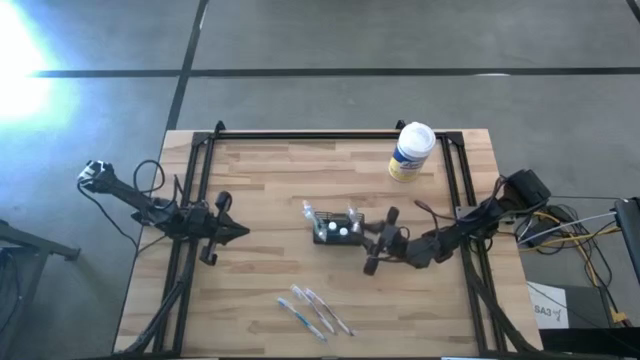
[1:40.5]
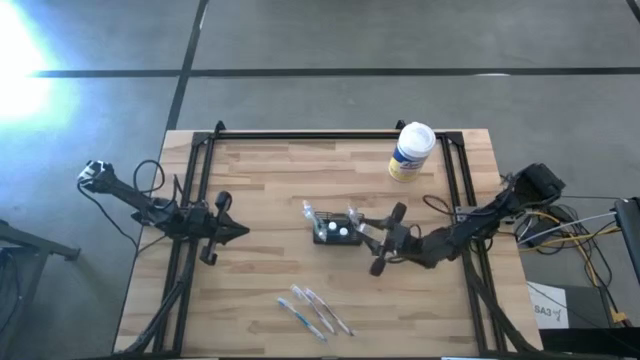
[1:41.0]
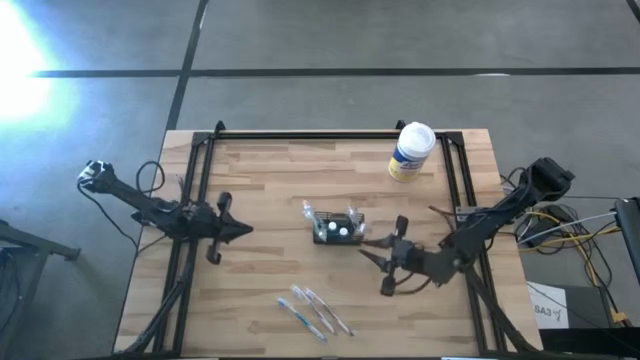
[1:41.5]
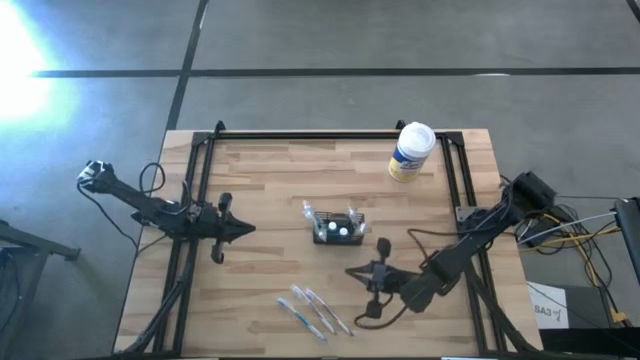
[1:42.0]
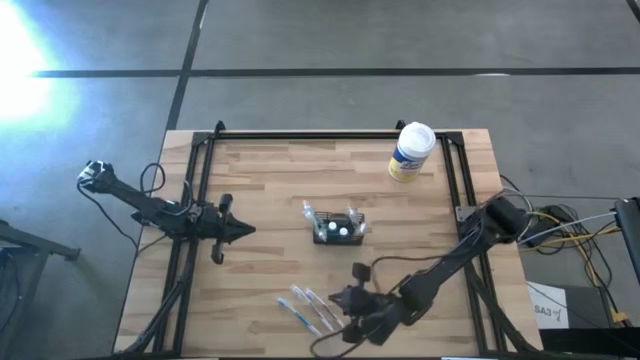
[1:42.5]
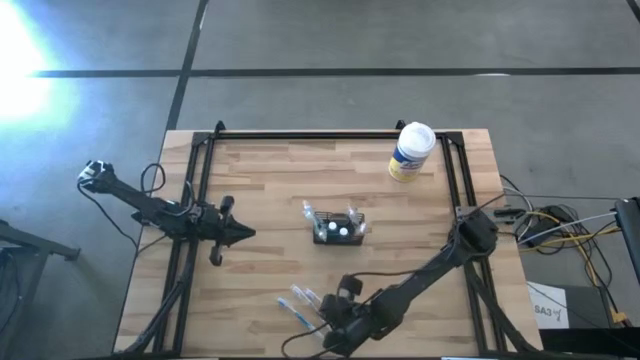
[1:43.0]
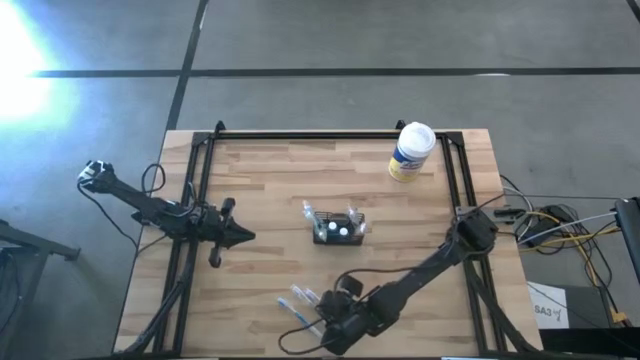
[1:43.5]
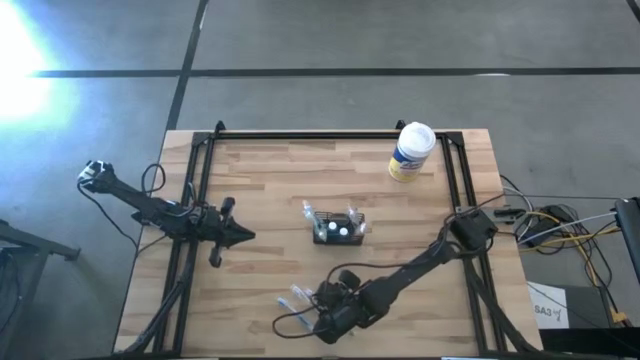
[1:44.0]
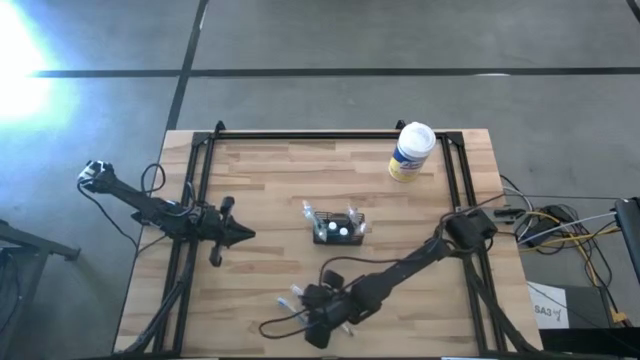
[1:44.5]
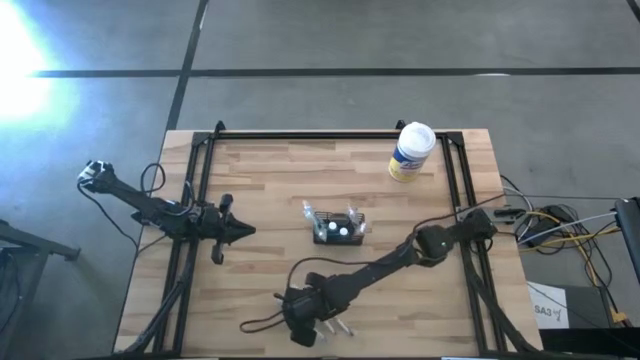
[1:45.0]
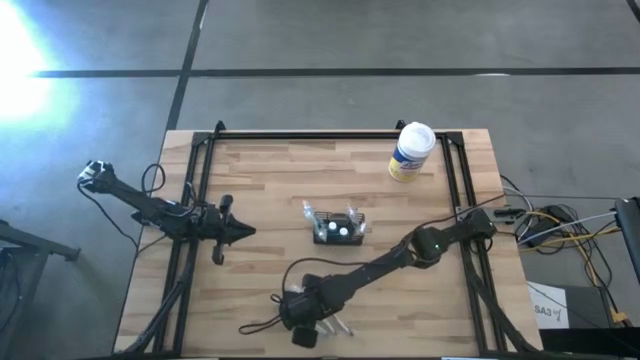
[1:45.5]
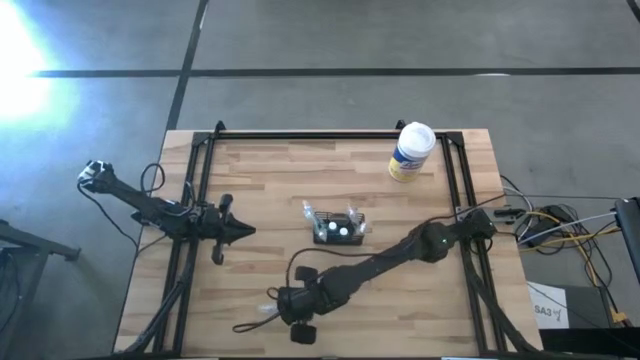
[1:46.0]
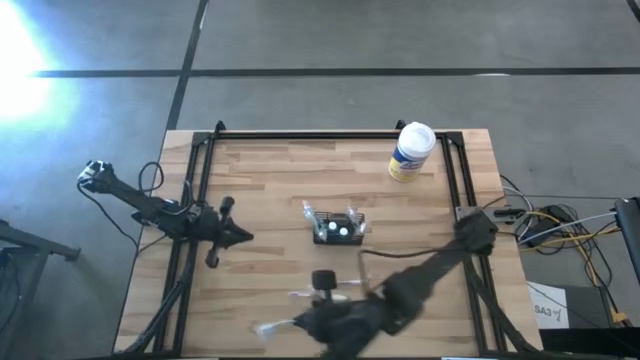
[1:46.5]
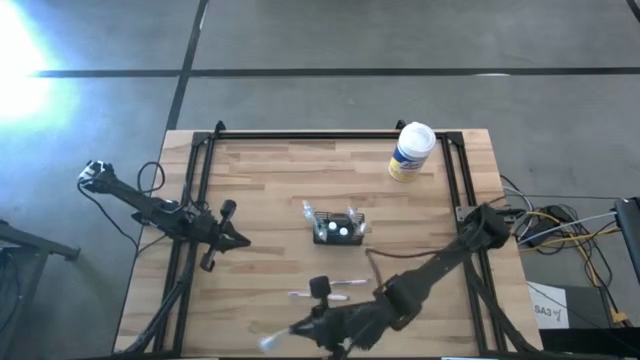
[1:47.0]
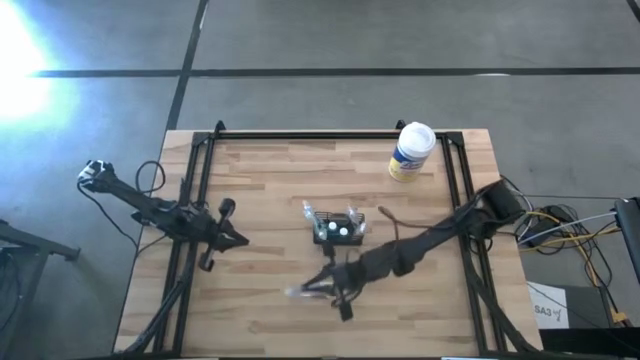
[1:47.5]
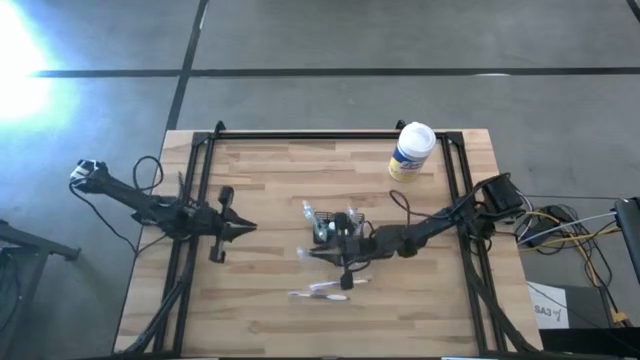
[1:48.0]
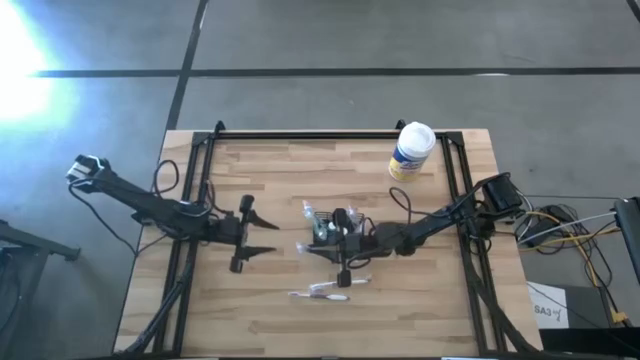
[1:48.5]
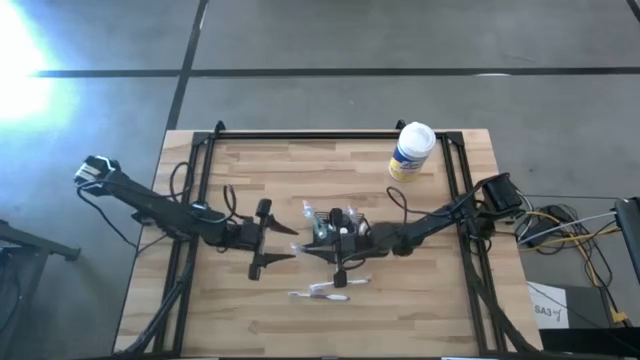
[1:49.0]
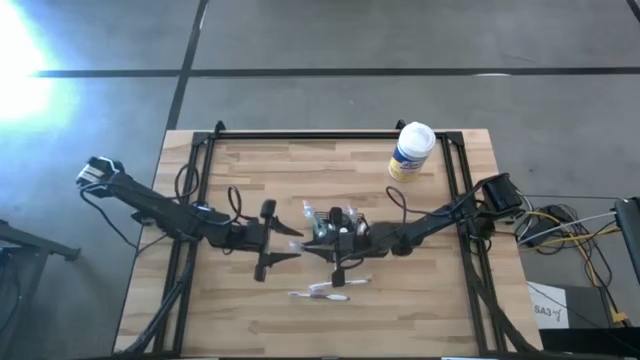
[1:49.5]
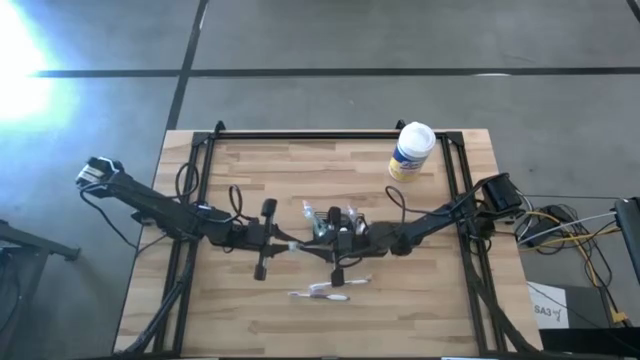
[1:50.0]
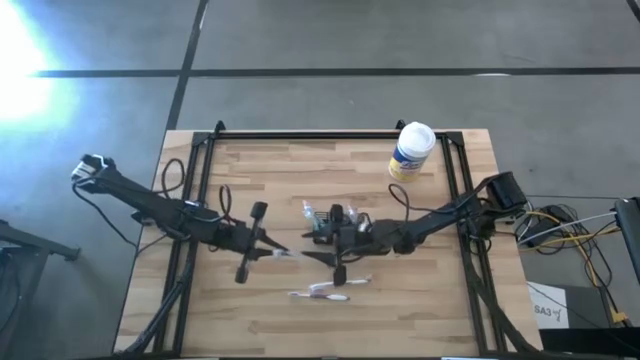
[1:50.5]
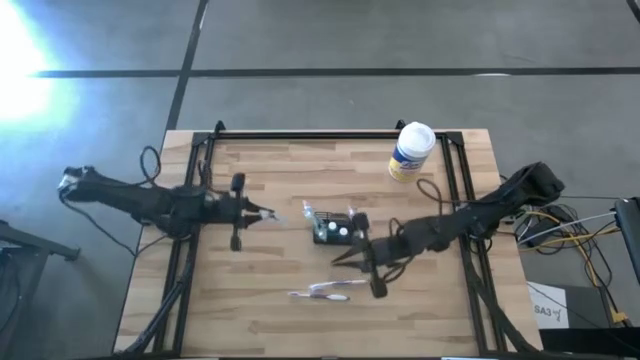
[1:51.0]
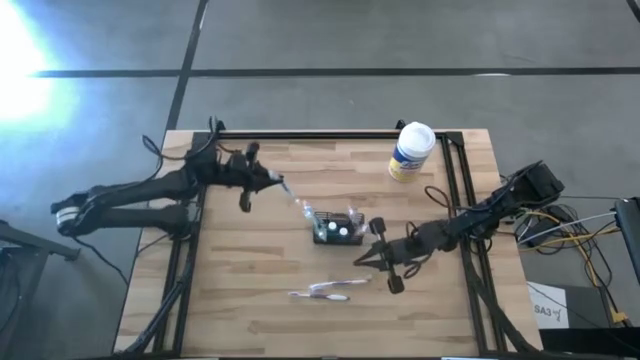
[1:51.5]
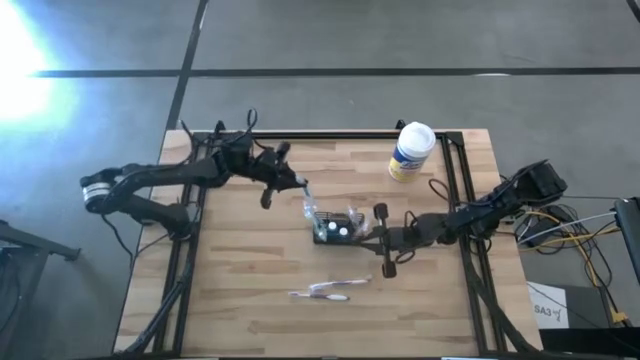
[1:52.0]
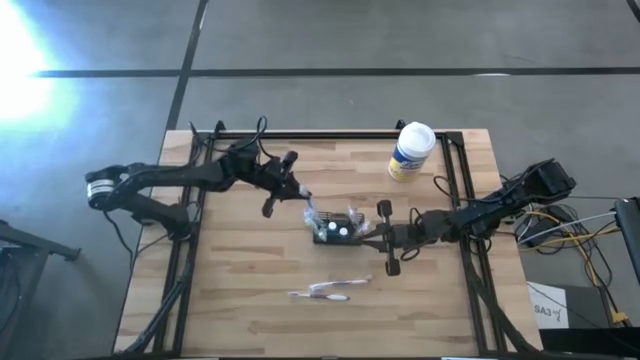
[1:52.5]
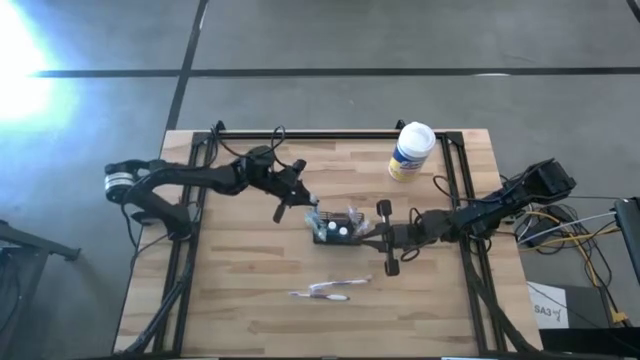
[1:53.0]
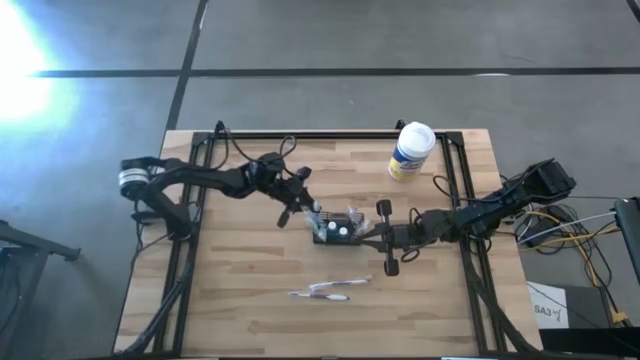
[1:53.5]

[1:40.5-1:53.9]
Task: Pick & Place toothbrushing station
Put the blue toothbrush into the black mesh organizer

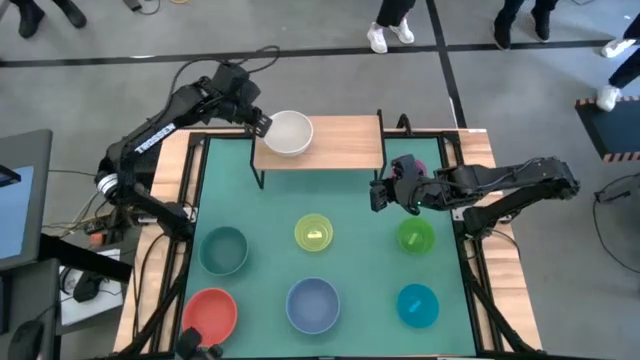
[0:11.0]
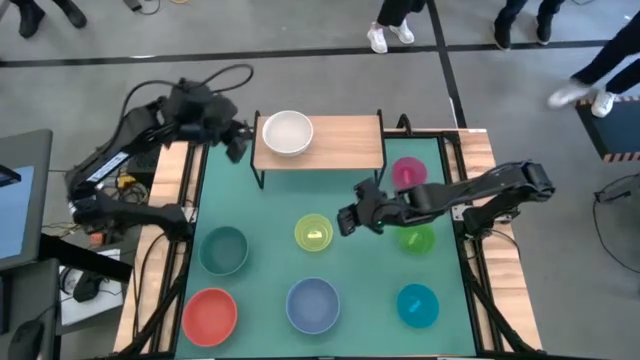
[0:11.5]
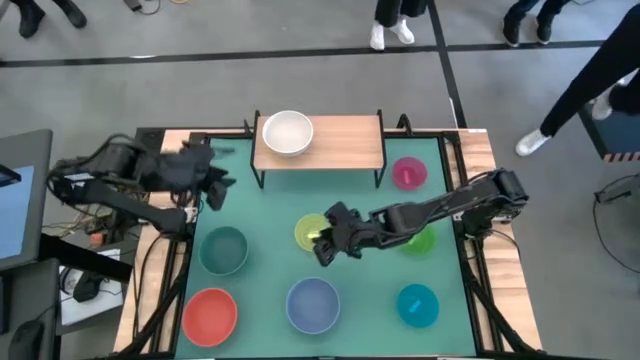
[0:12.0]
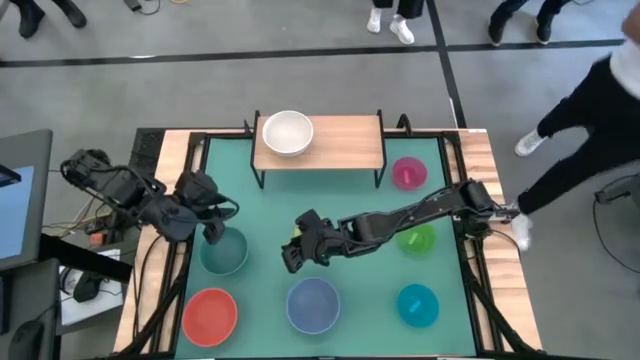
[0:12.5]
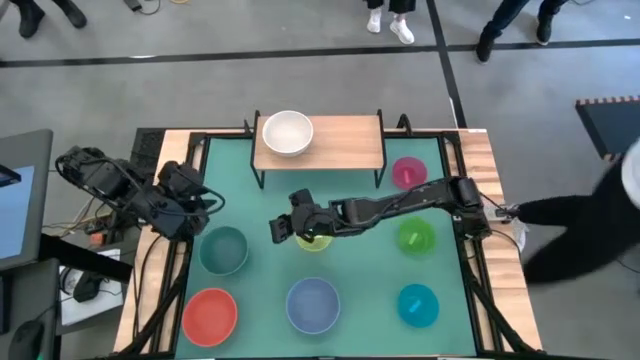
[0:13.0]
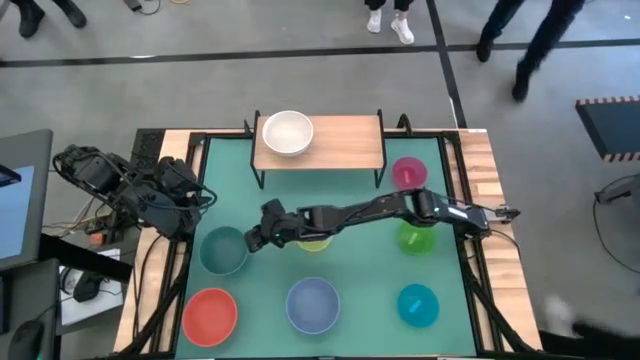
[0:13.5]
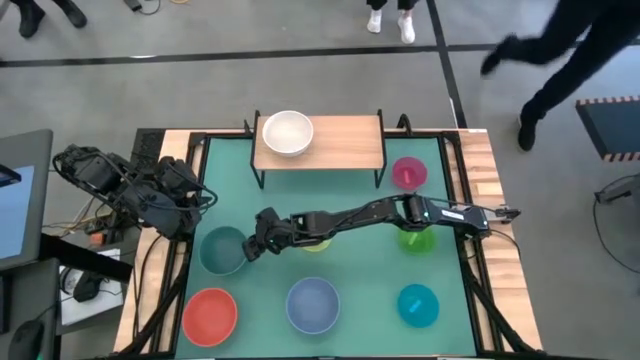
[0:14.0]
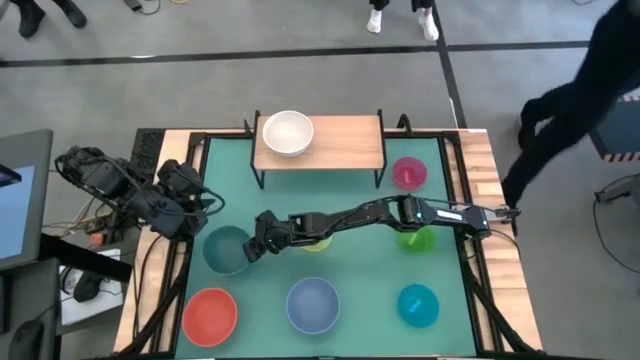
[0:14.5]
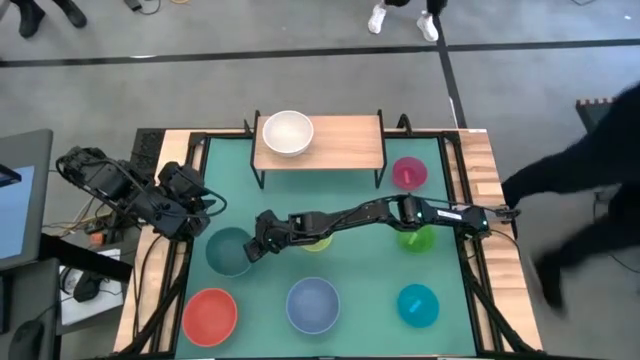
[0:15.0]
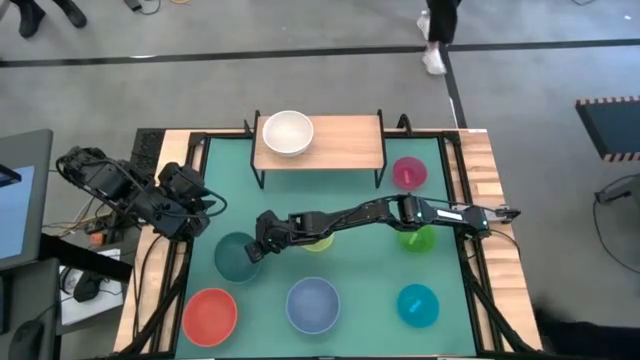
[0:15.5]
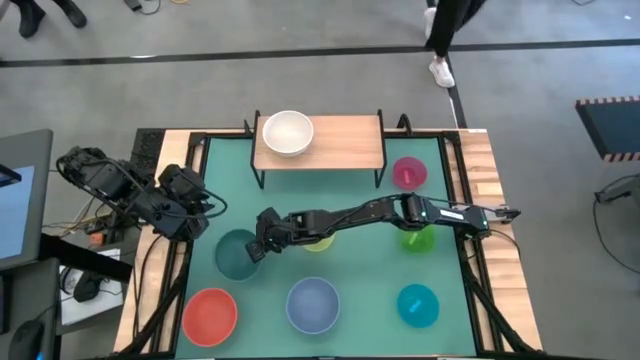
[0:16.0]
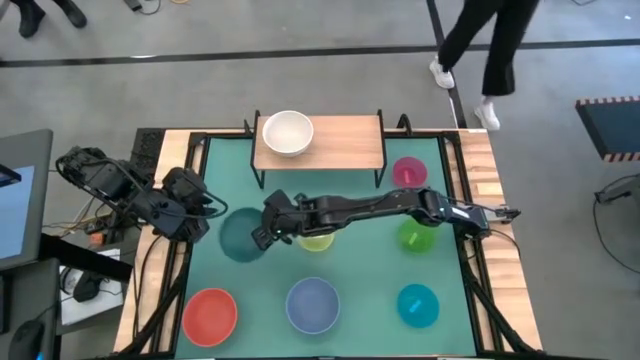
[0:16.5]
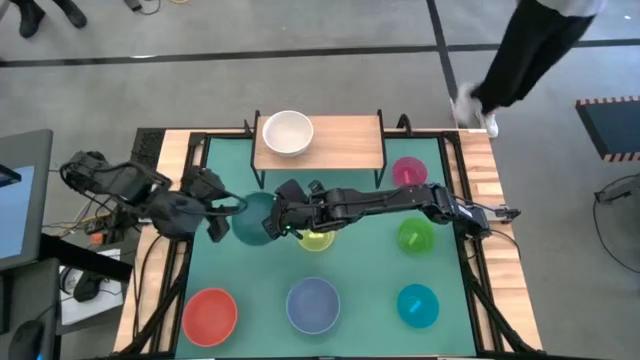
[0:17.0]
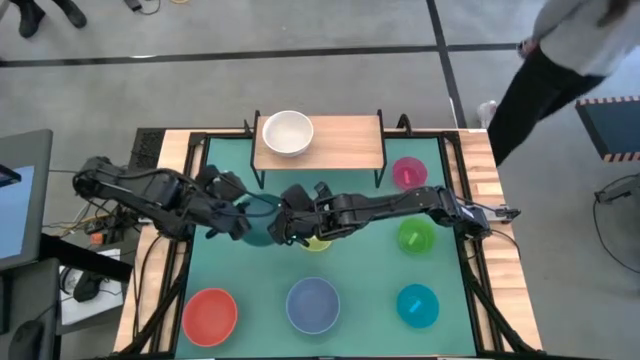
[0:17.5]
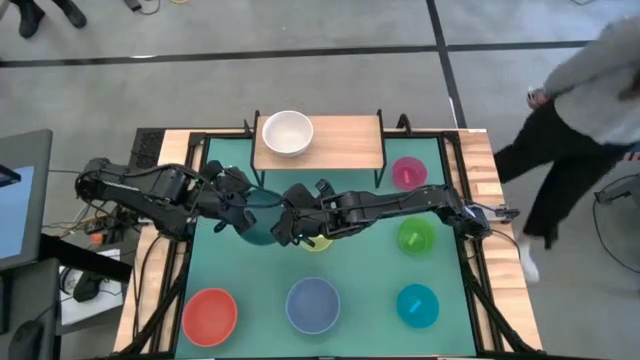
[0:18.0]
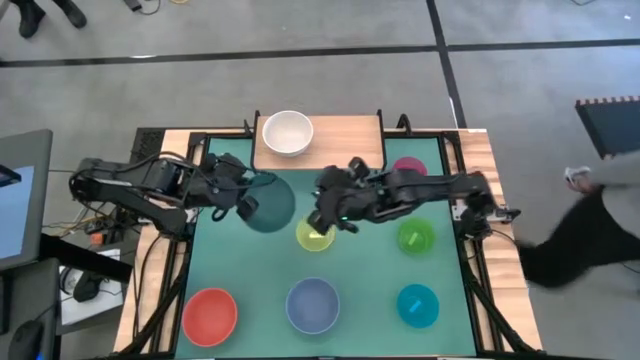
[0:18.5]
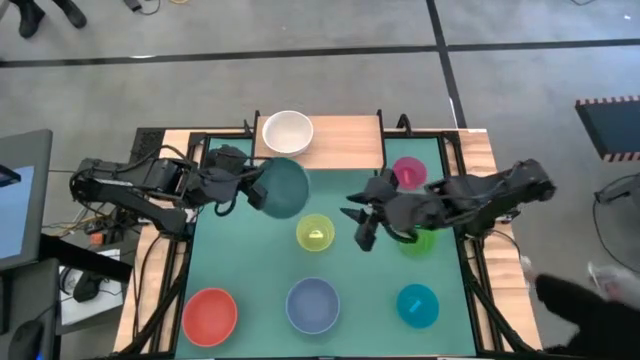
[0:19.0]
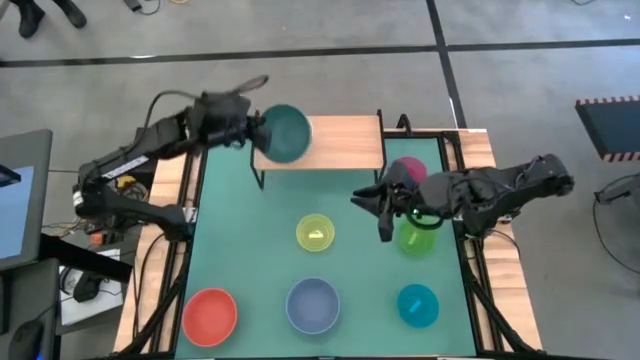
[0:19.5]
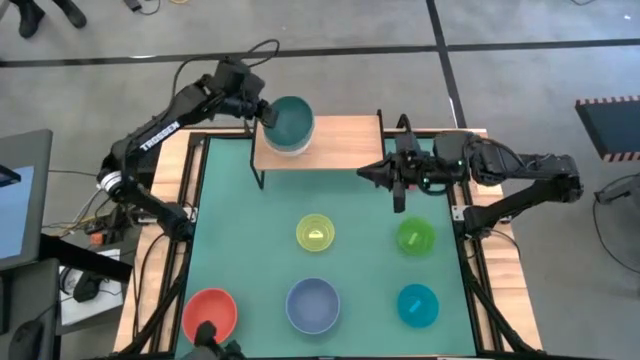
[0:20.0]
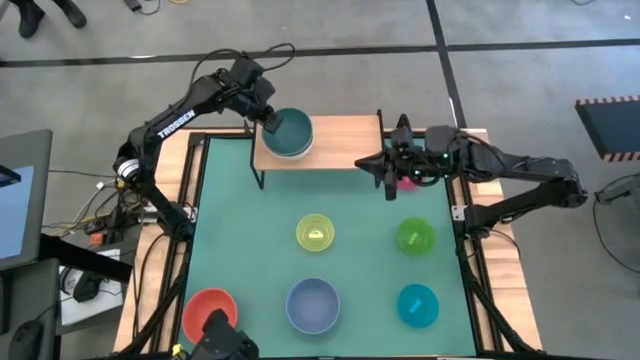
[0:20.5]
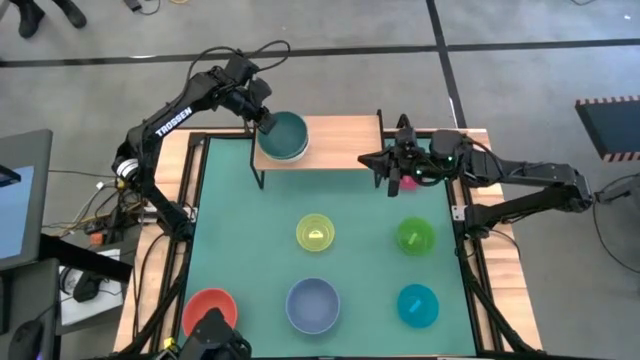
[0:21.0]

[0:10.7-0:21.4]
Task: Place and stack bowls onto a shelf
Stack the large dark green bowl on the large white bowl on the shelf
